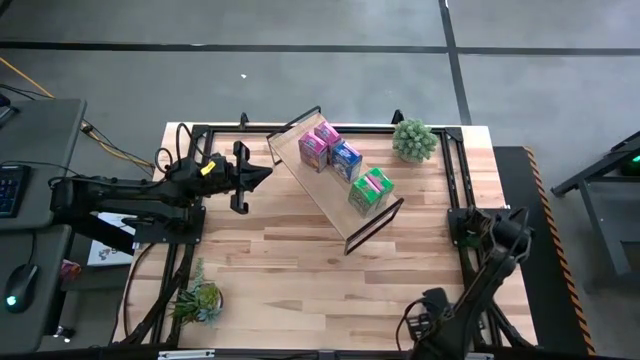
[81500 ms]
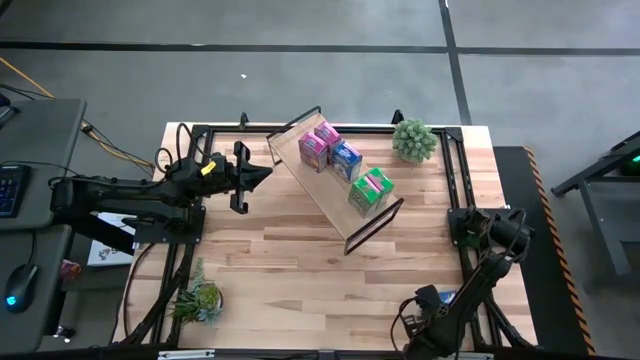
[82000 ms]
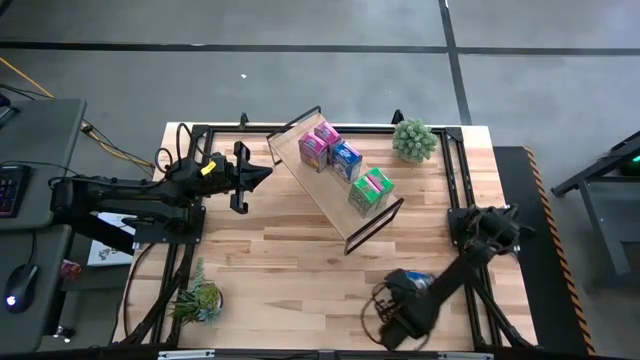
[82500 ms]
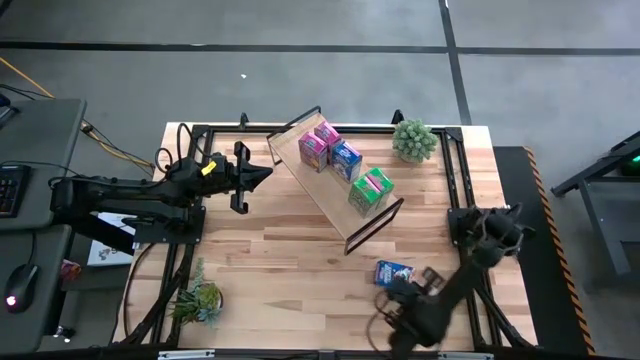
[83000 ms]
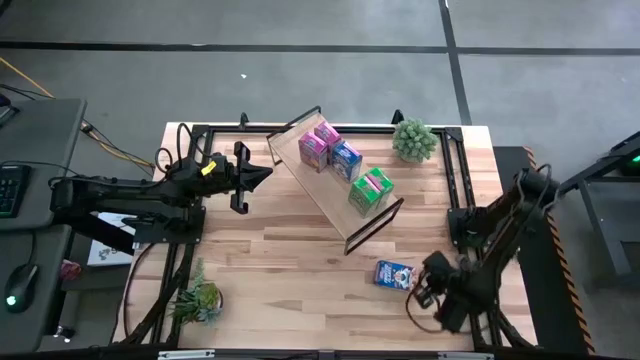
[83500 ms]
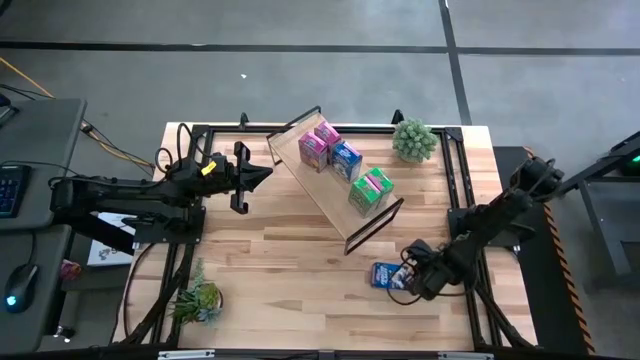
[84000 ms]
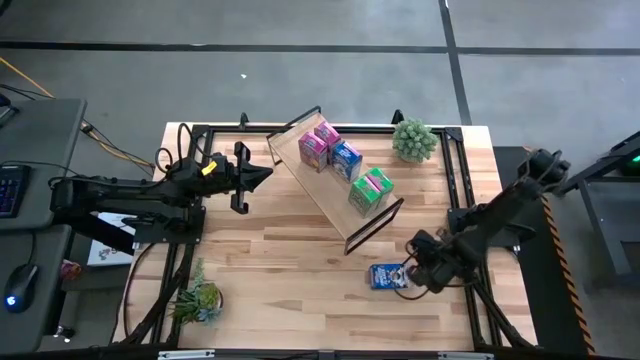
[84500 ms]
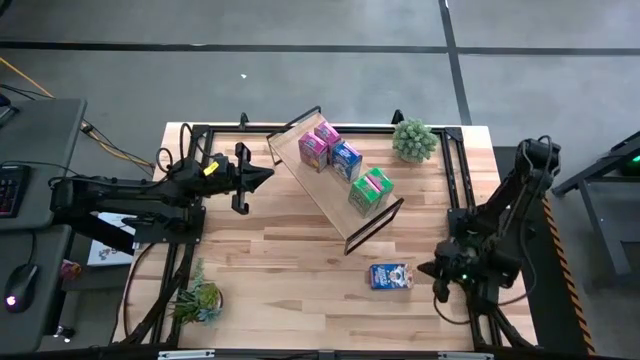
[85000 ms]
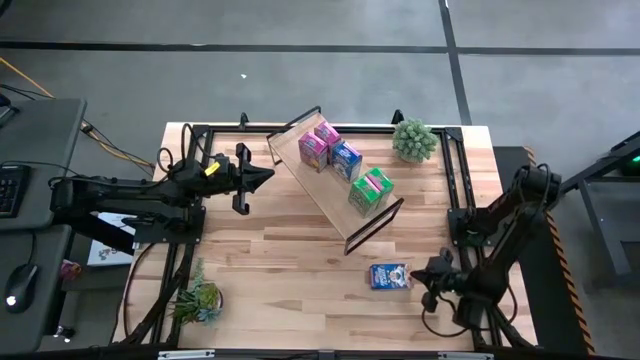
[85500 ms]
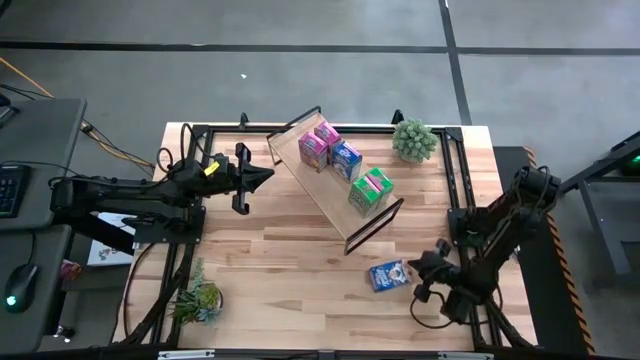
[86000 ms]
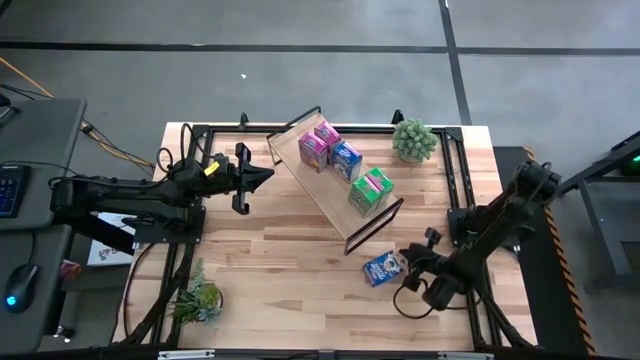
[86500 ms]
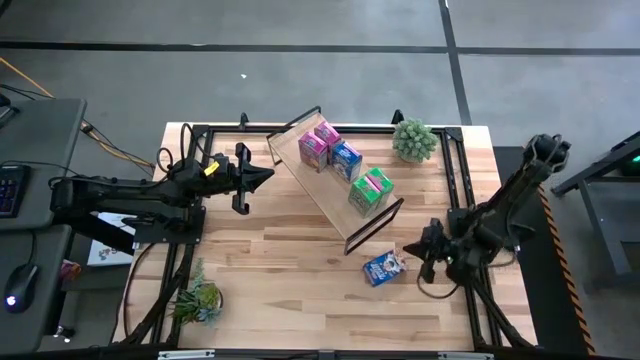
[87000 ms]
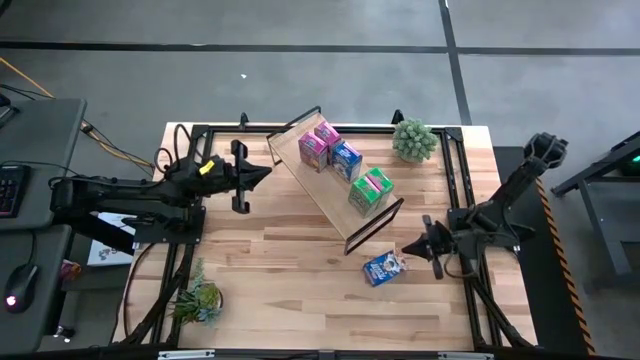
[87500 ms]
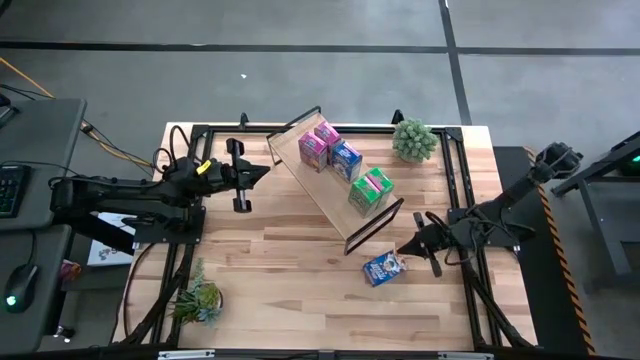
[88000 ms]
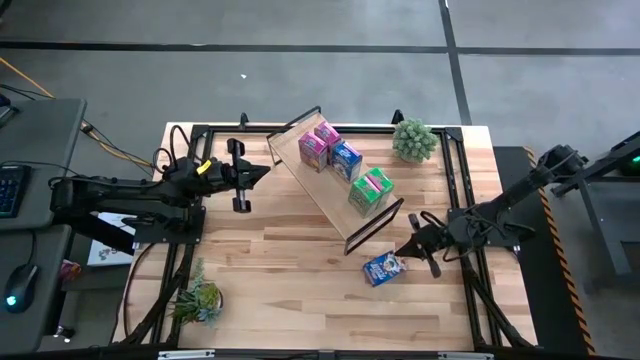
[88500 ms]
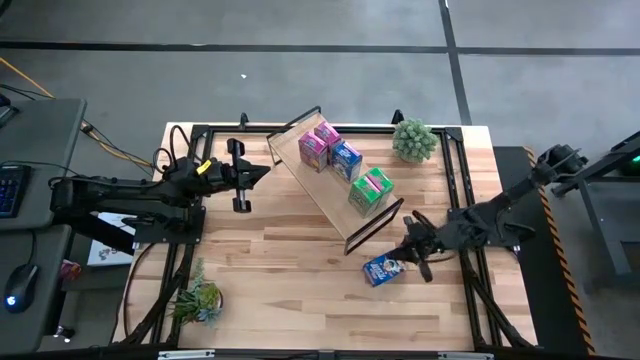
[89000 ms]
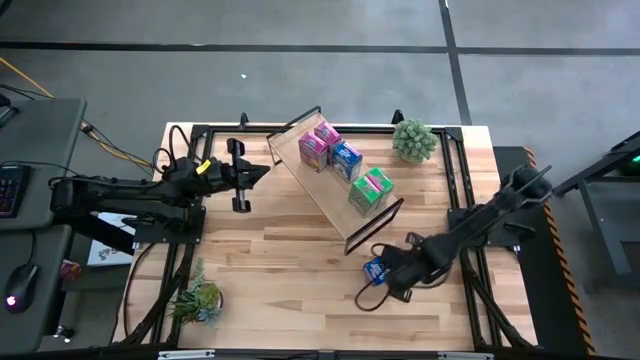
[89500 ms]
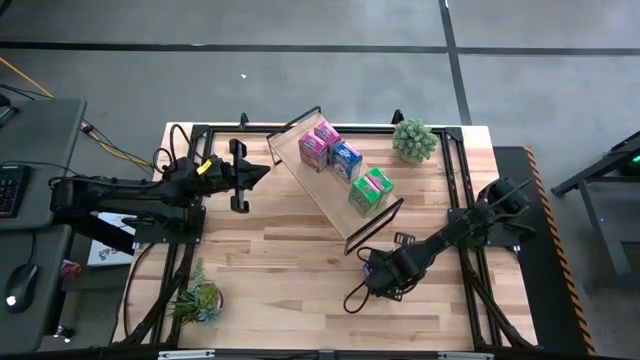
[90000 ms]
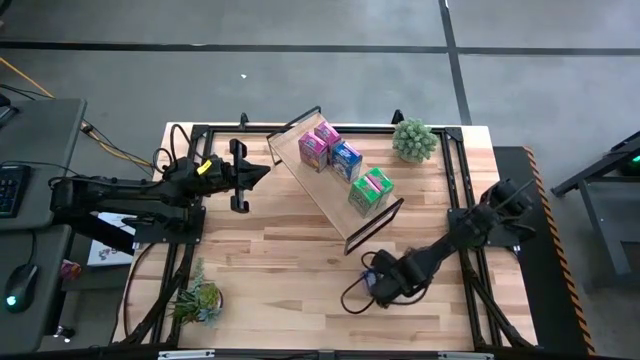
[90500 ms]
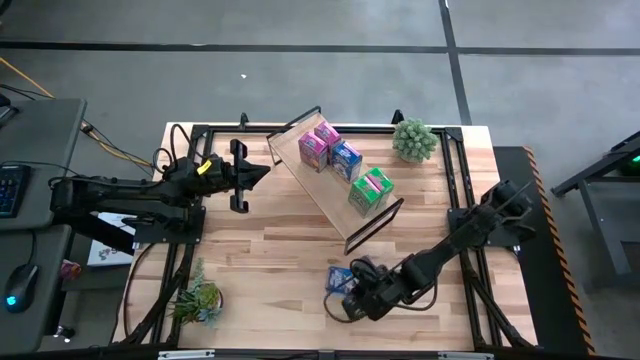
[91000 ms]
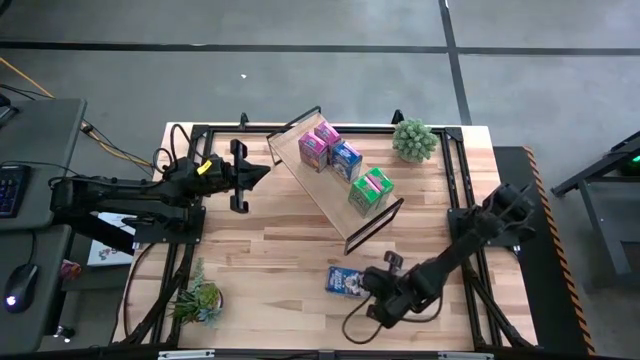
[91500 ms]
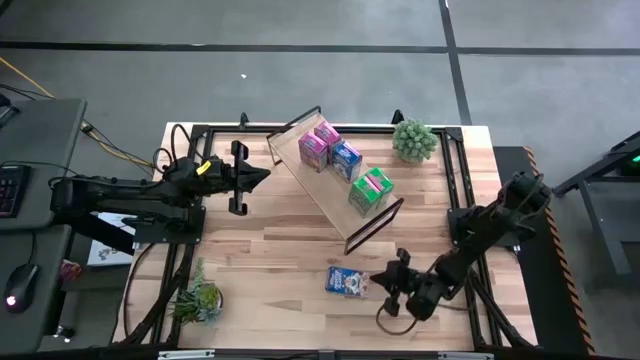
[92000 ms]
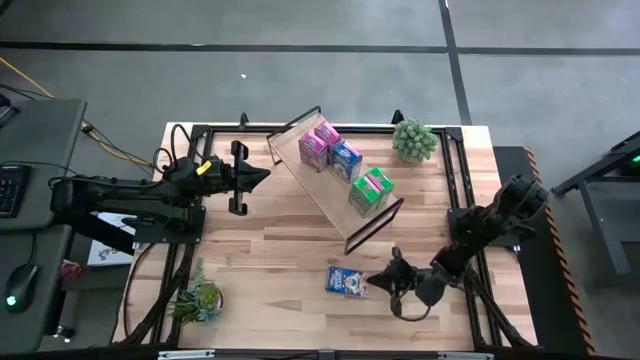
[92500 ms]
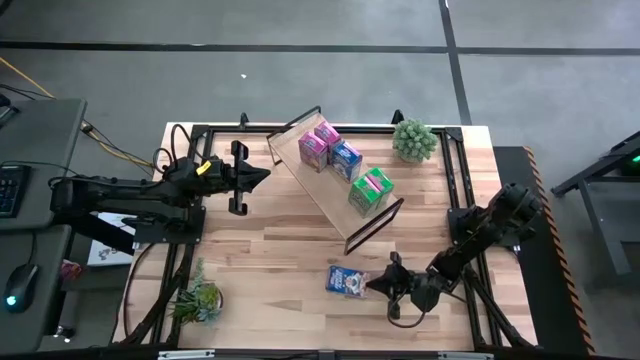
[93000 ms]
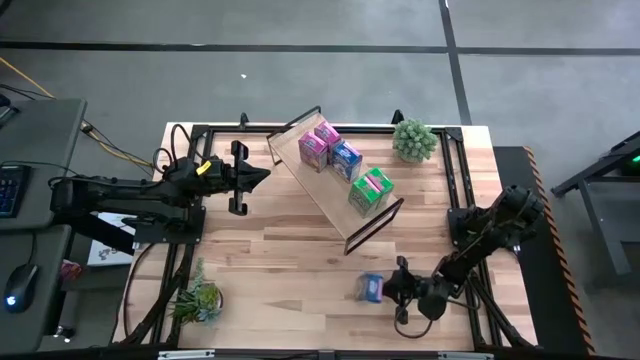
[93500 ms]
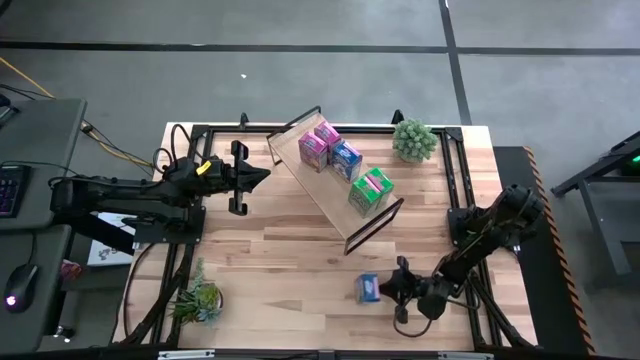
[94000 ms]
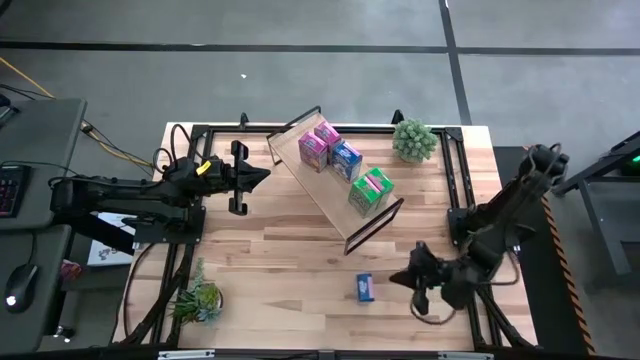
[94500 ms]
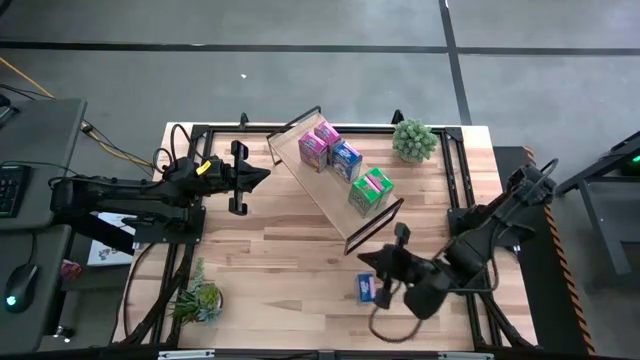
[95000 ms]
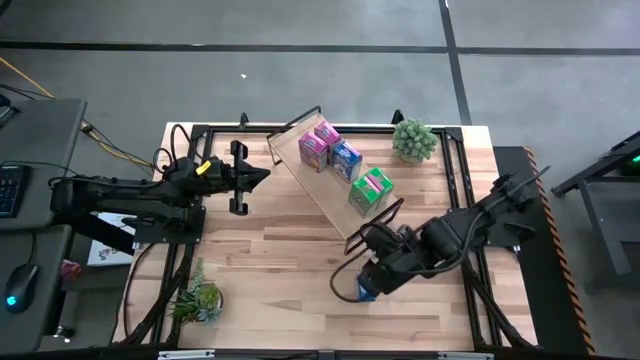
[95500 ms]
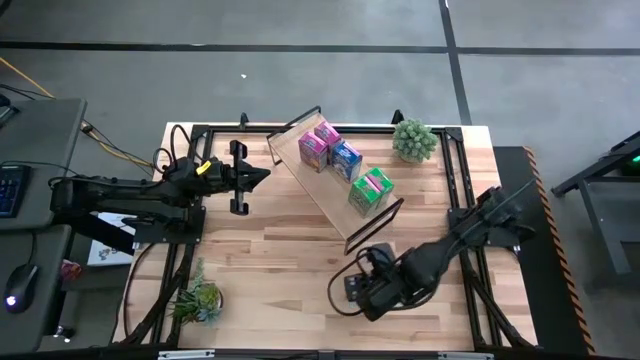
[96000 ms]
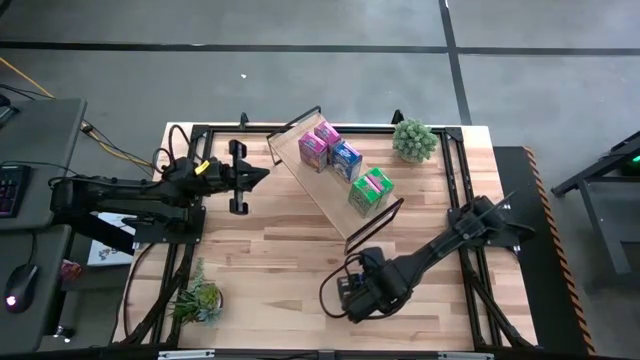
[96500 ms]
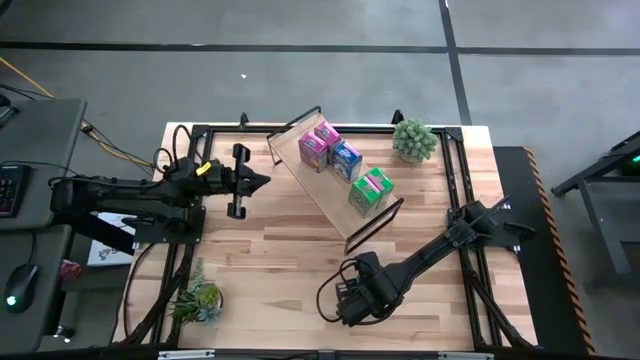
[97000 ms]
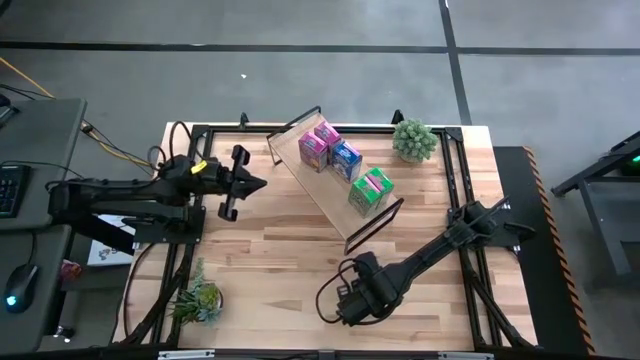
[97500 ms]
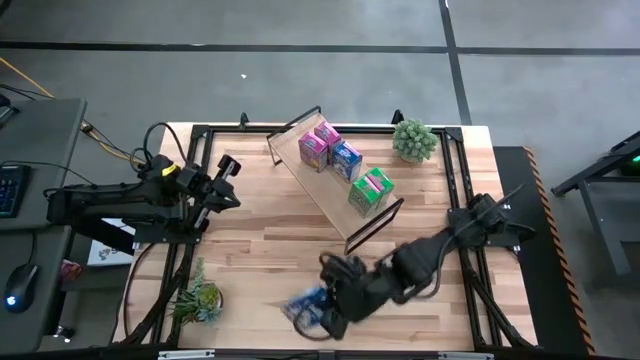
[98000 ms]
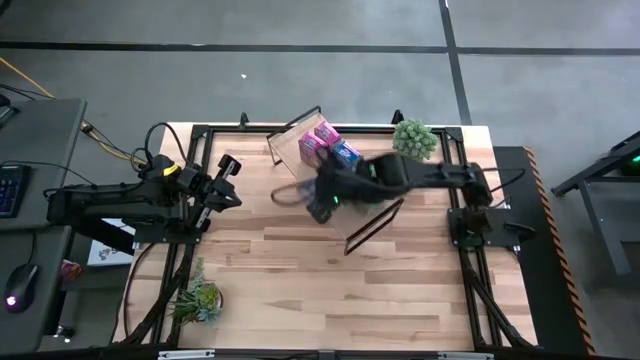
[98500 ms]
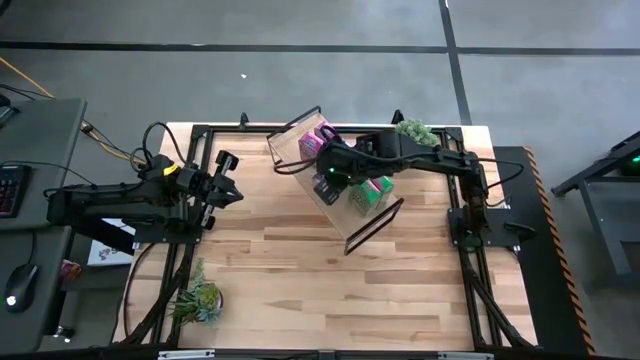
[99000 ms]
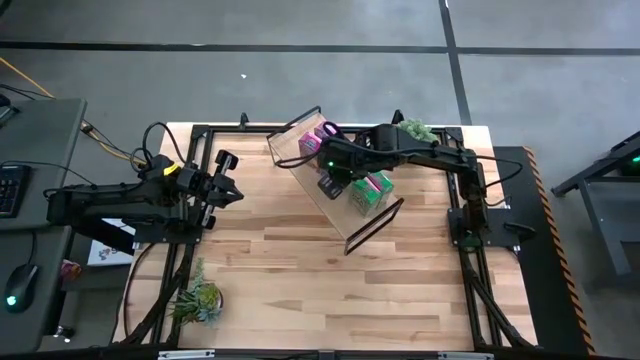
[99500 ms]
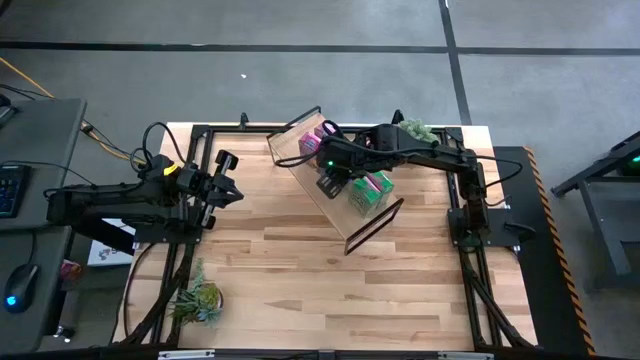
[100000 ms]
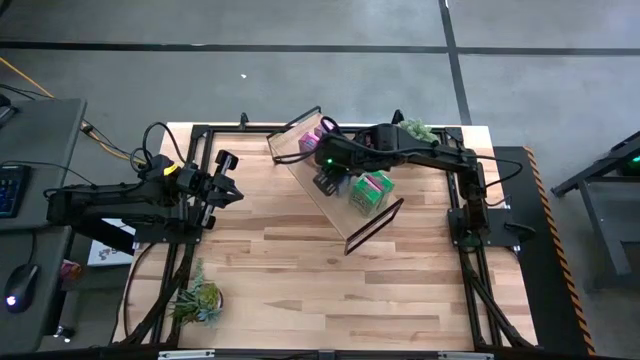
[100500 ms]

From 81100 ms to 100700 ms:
Task: Stack cereal on shelf
Put the blue cereal box aligned with the other blue cereal box on the shelf

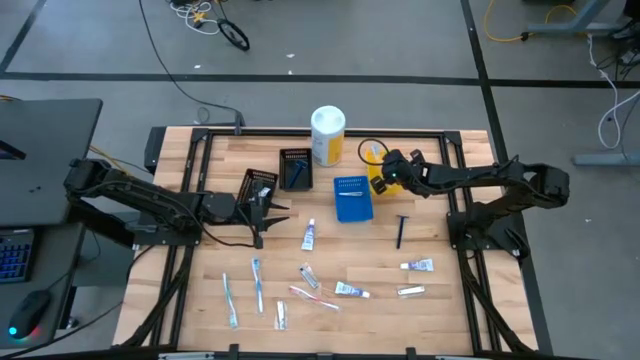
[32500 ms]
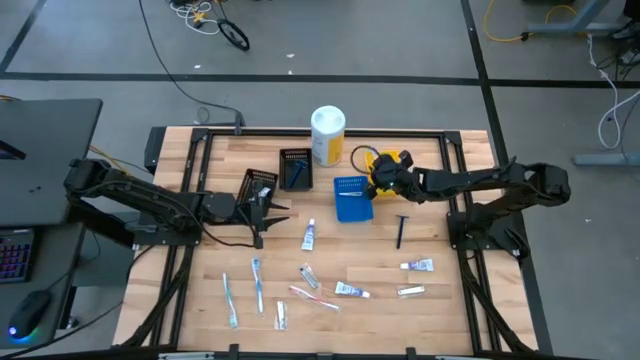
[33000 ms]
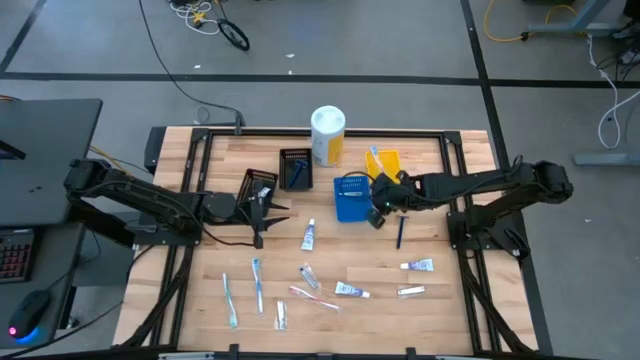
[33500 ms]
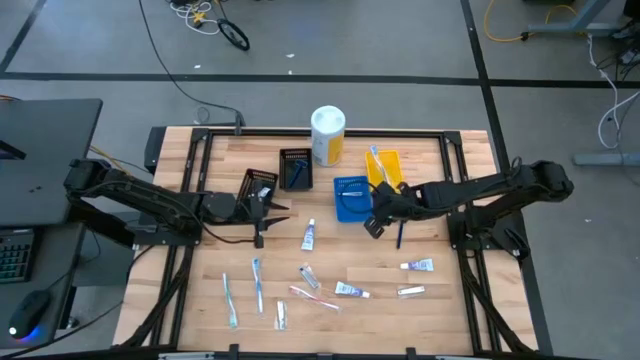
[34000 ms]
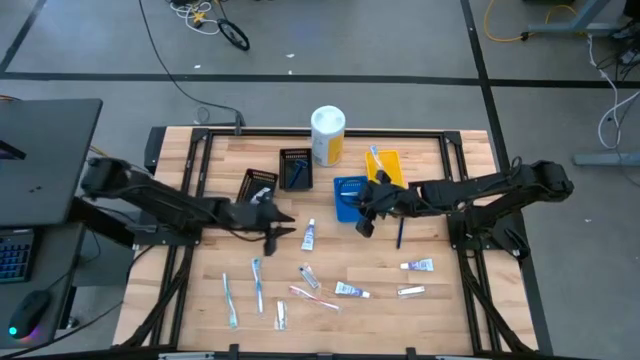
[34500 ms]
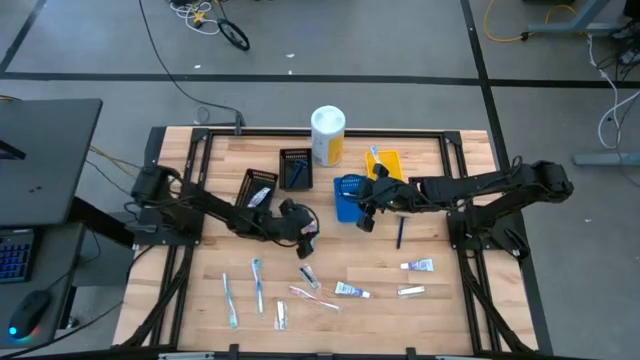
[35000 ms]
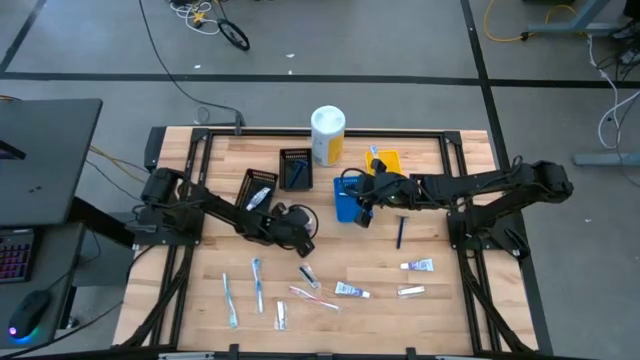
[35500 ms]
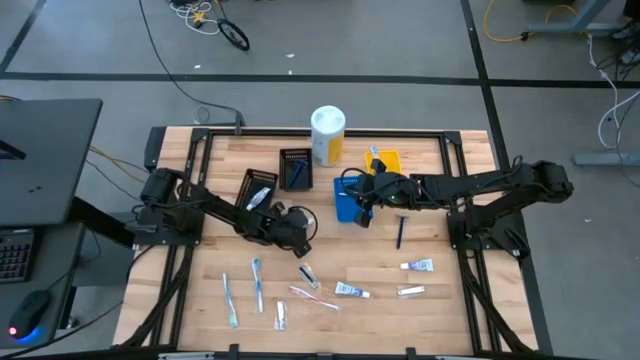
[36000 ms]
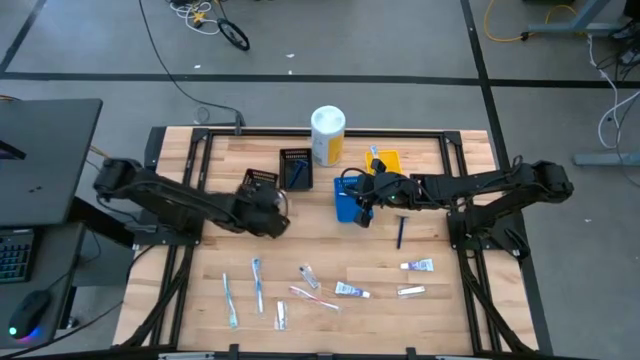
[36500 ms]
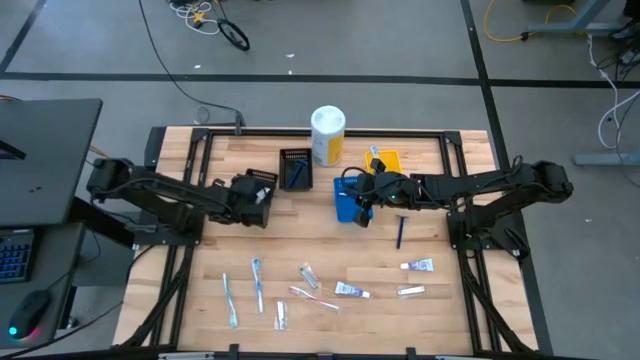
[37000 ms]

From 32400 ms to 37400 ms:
Task: Pick & Place Travel size toiletries
Put the white toothpaste into the left black bin
